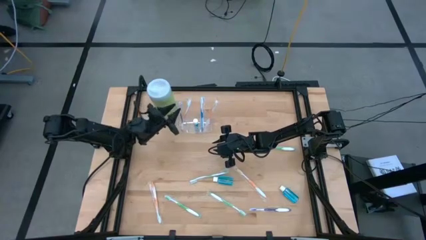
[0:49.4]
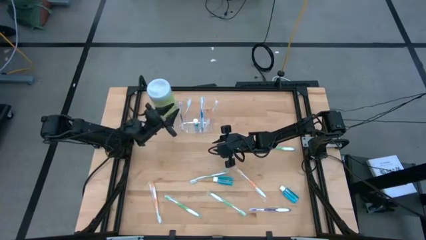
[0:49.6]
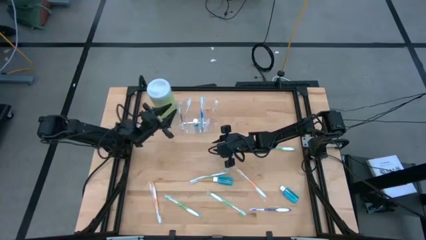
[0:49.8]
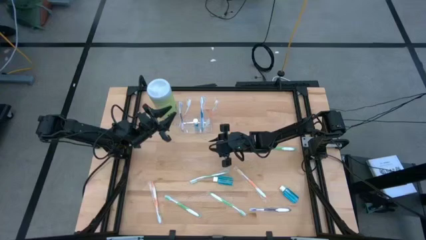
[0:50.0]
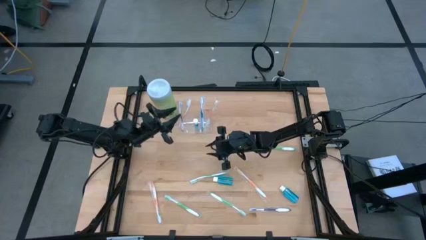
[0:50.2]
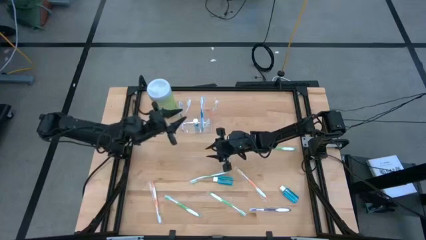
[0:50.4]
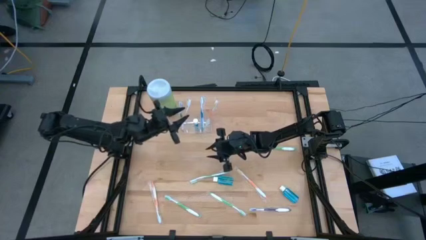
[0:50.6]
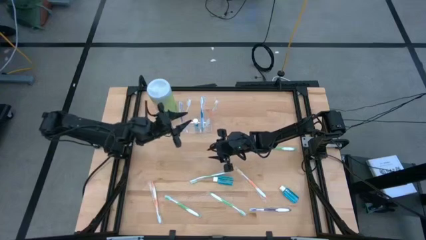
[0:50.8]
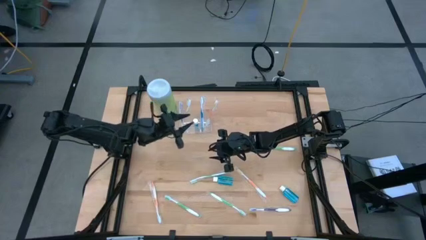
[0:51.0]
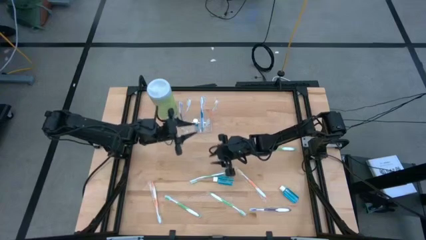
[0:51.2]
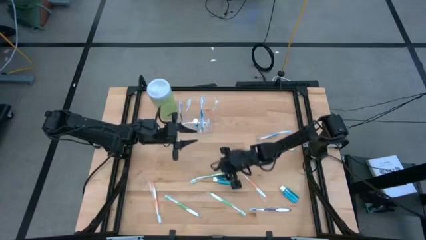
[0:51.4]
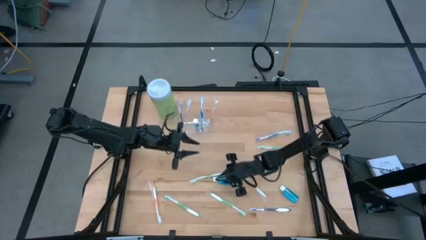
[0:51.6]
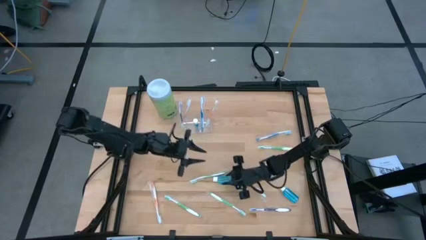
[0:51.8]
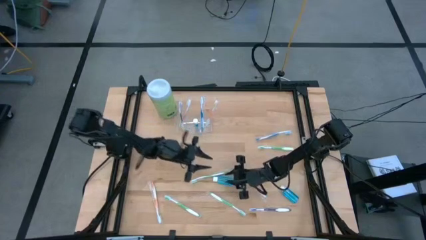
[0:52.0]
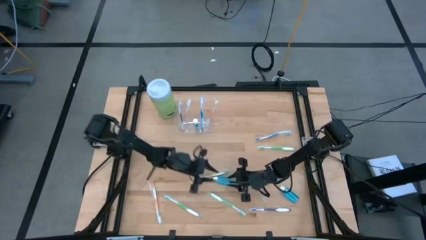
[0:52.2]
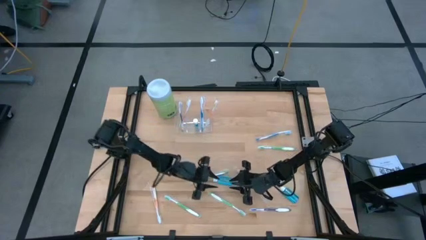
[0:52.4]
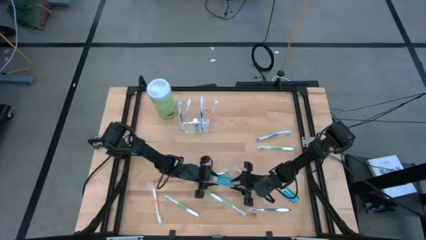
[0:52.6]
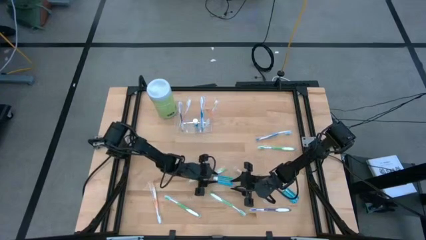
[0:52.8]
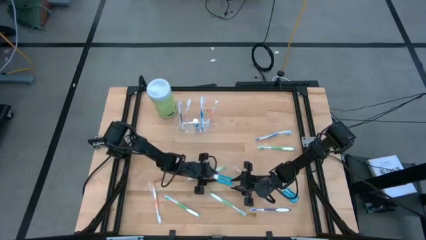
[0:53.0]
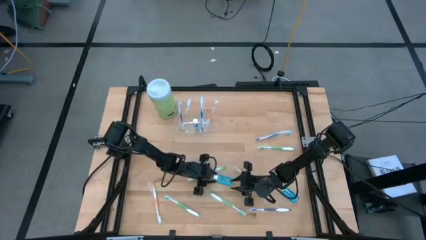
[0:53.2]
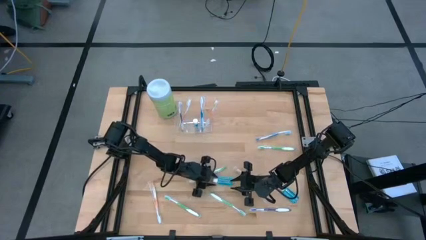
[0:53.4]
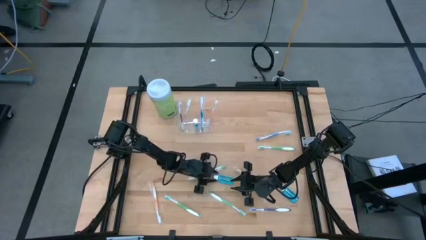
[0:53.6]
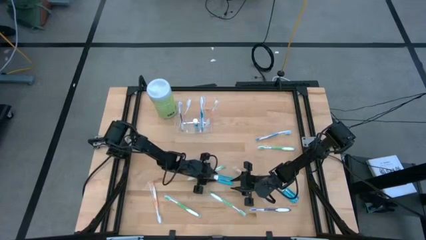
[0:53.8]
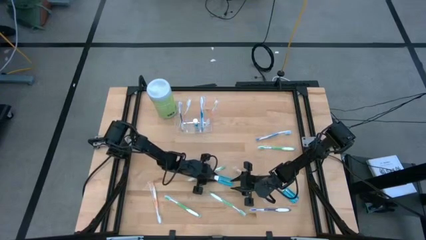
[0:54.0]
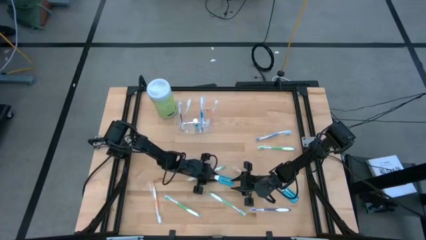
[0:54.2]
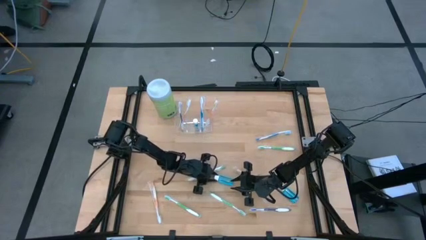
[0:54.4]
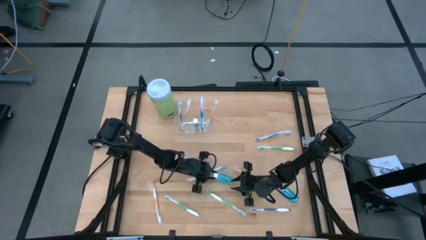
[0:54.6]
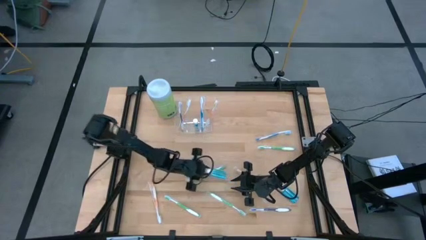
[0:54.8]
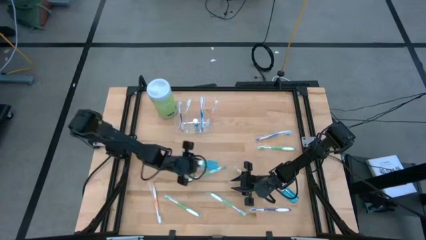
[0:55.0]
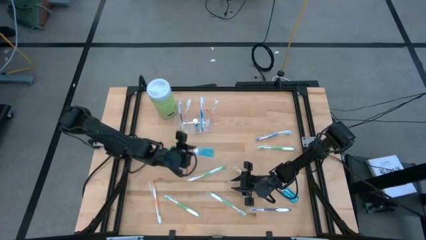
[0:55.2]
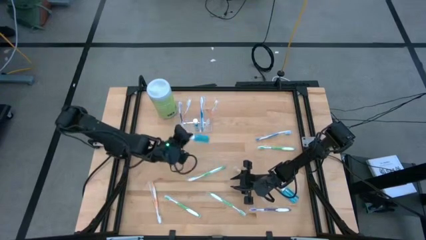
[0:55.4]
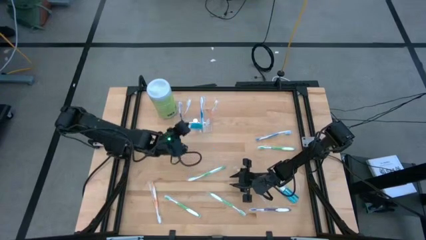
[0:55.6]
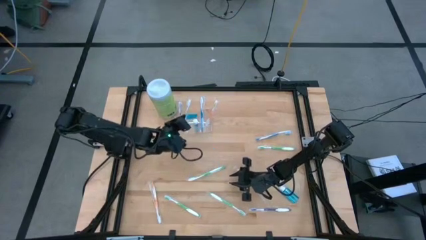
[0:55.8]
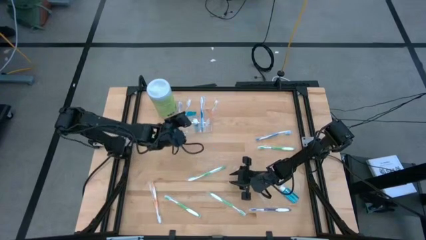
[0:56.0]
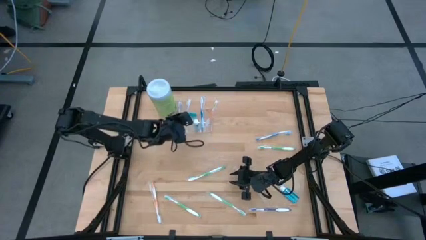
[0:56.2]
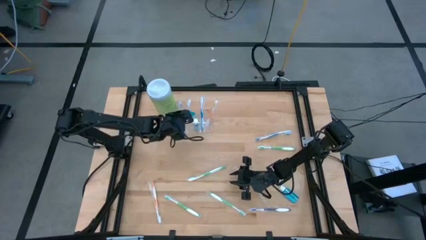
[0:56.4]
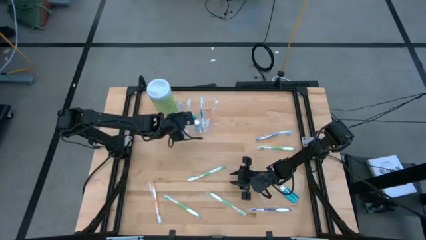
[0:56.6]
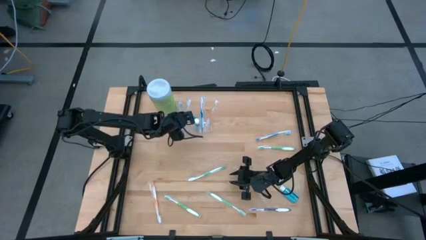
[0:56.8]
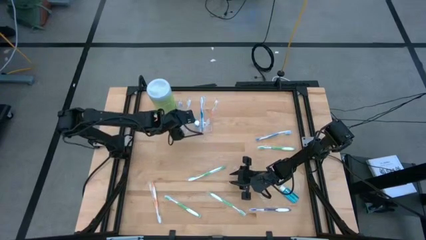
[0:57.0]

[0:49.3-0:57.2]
Task: Pick & Place toothbrushing station
Put the blue mouthwash into the transparent organizer

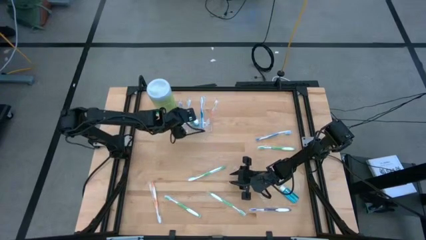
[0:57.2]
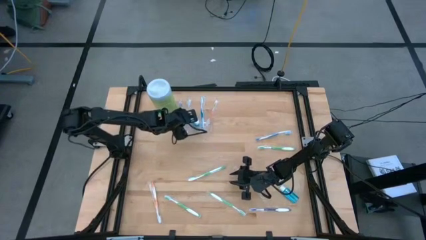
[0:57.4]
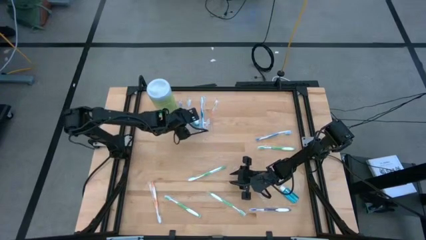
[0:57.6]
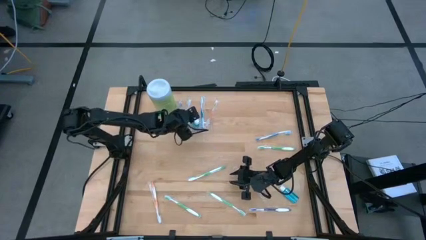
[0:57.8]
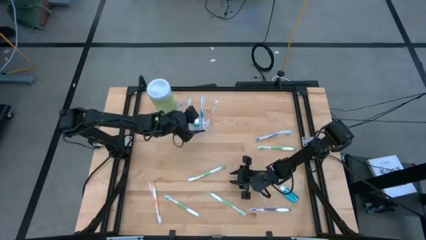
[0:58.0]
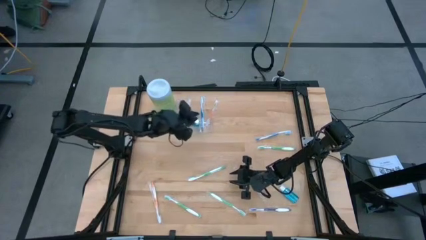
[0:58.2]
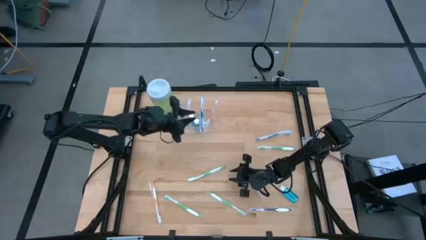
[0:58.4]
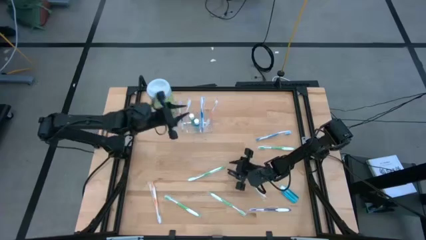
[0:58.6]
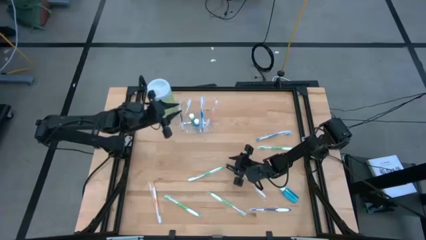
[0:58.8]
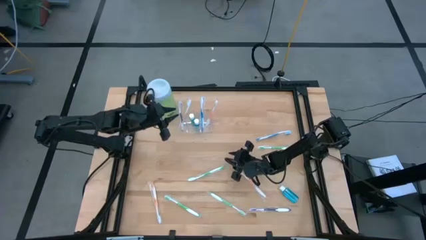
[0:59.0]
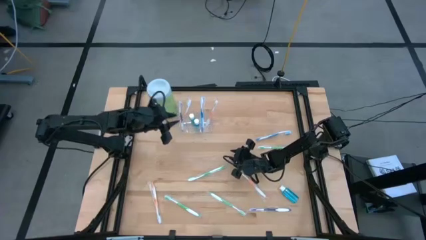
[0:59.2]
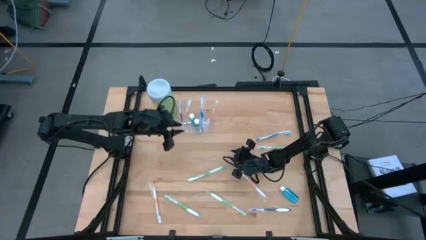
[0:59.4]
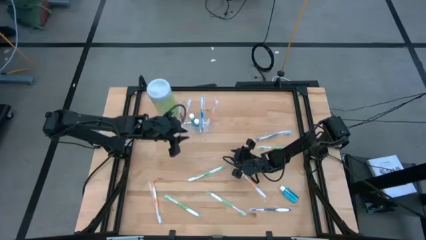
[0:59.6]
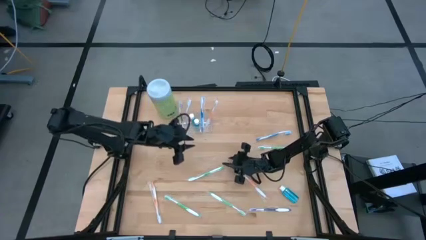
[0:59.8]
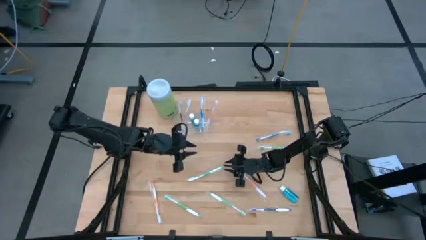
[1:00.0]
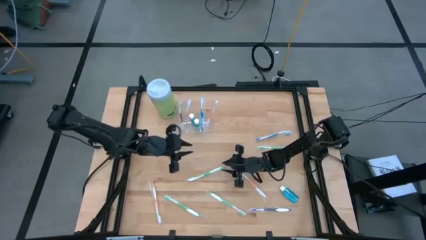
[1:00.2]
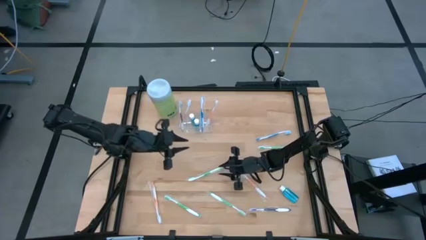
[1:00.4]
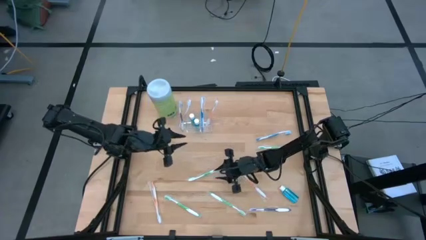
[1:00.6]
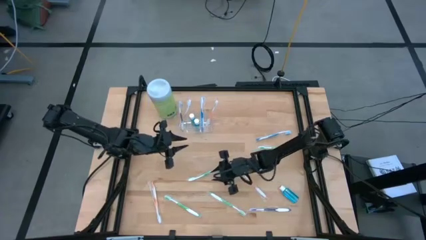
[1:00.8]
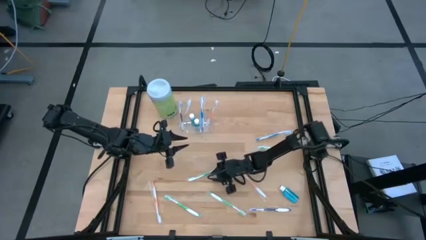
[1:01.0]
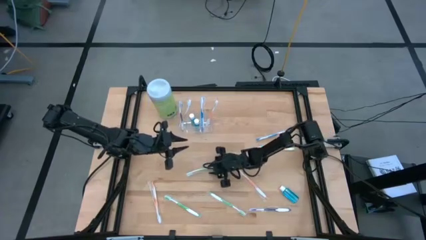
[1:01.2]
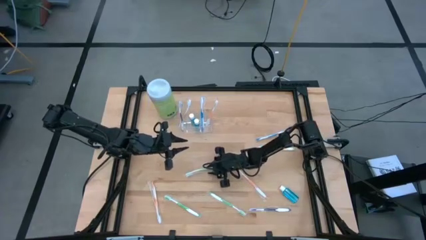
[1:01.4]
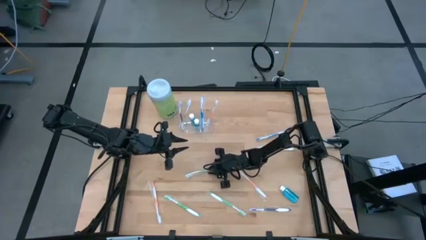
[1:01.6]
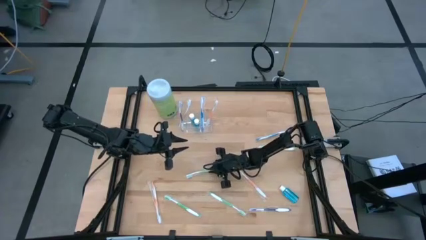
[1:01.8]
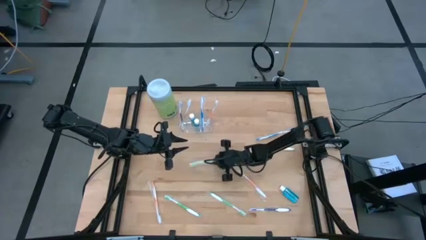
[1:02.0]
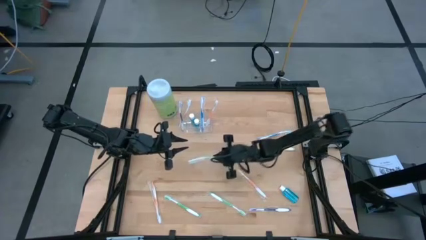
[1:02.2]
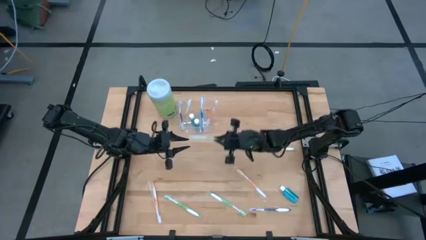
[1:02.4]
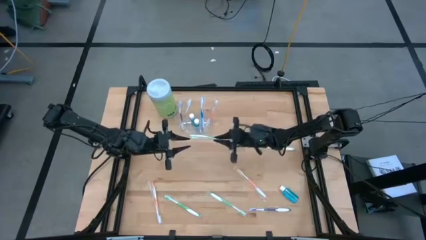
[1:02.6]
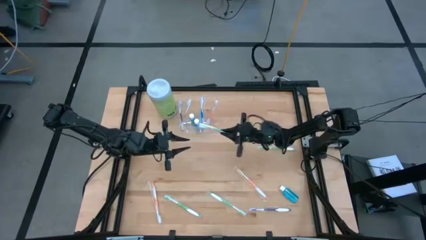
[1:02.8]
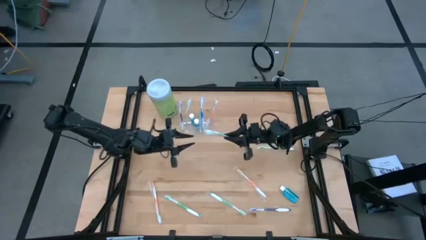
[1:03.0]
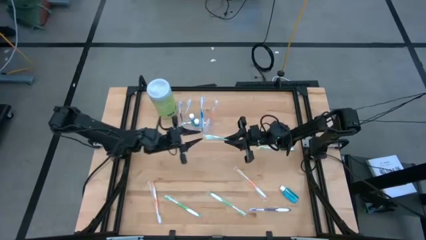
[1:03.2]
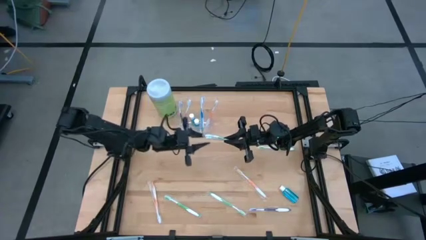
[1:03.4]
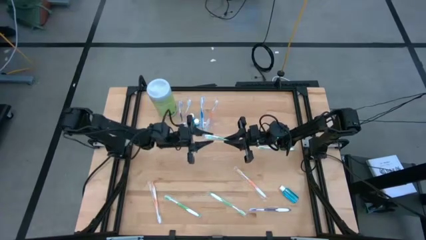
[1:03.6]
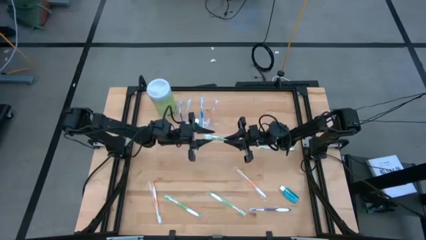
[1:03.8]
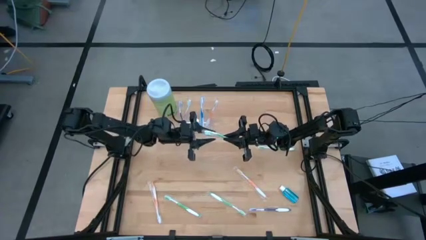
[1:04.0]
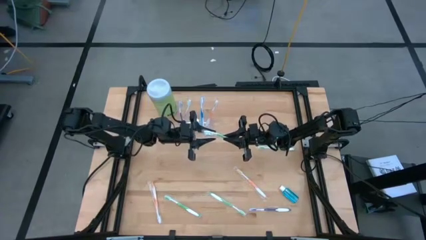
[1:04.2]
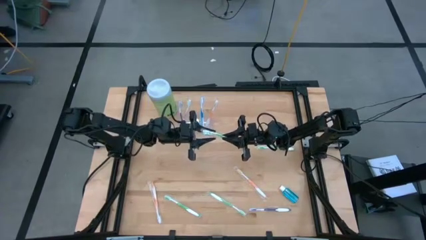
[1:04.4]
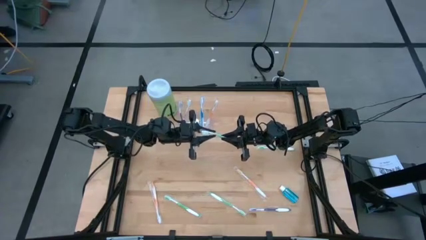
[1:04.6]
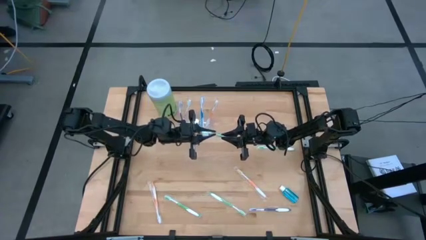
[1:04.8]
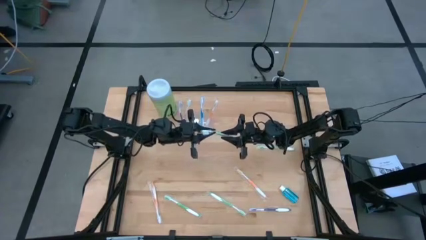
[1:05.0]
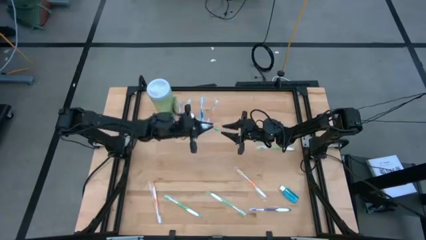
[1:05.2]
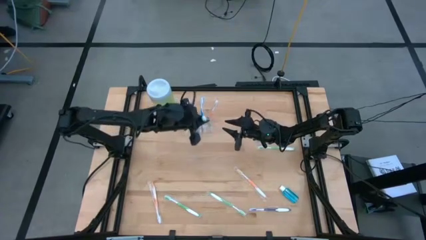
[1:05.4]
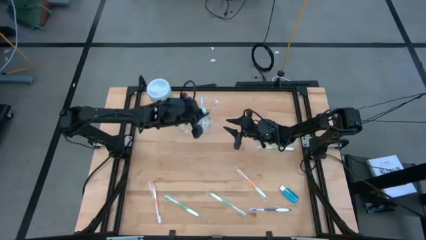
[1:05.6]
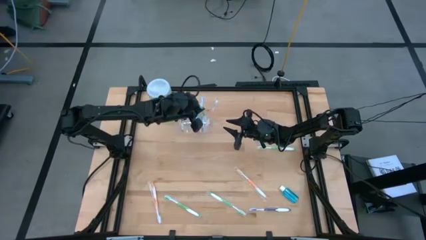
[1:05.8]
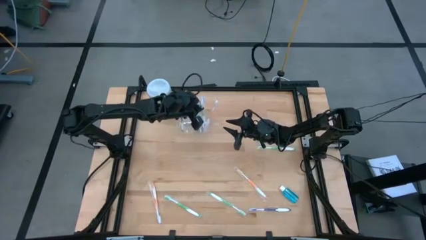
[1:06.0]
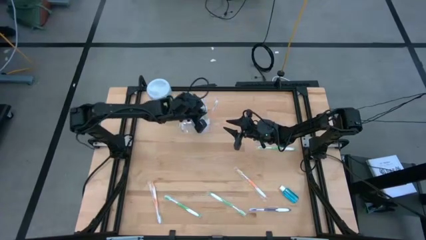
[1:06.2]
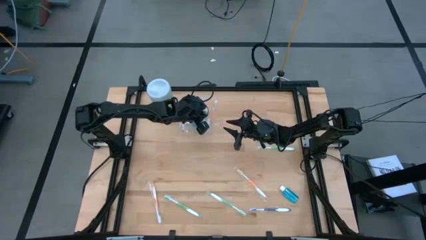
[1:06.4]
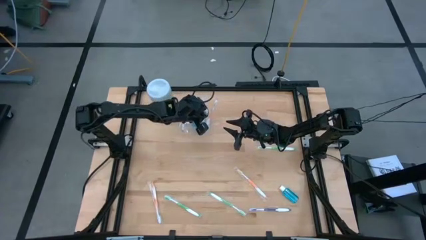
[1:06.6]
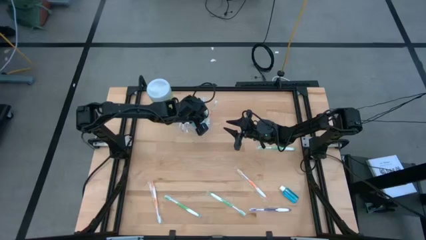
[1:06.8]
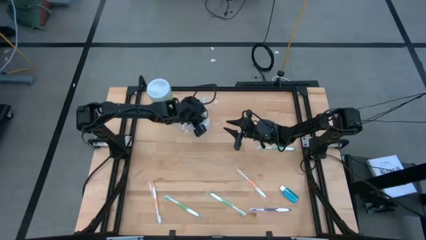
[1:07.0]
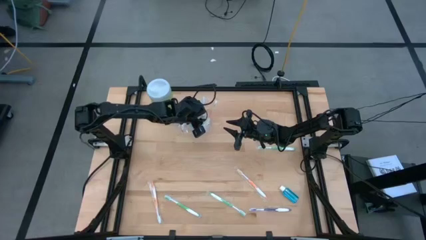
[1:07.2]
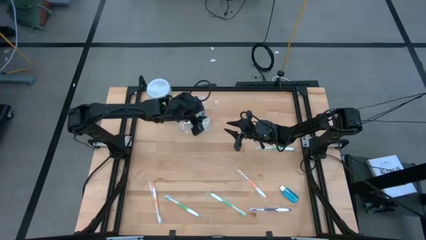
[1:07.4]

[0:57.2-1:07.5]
Put the green toothbrush into the transparent organizer
